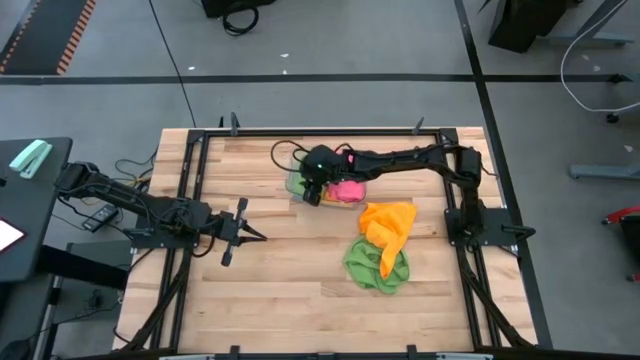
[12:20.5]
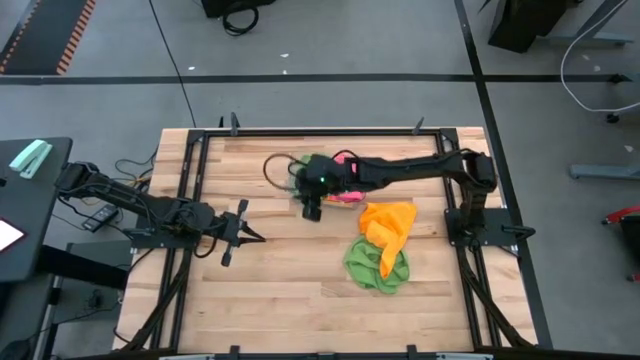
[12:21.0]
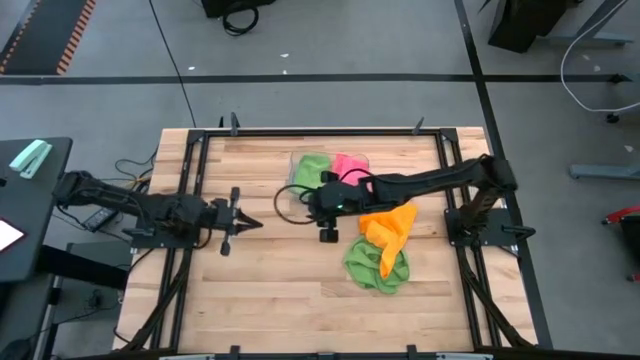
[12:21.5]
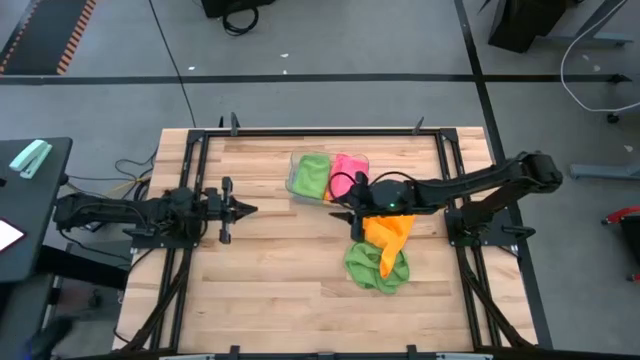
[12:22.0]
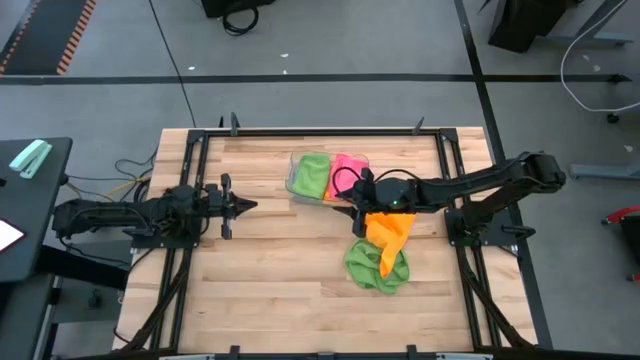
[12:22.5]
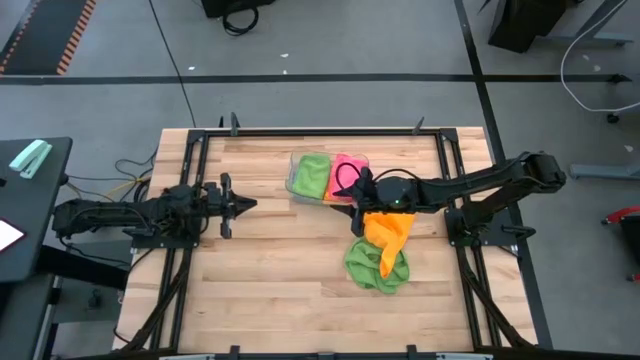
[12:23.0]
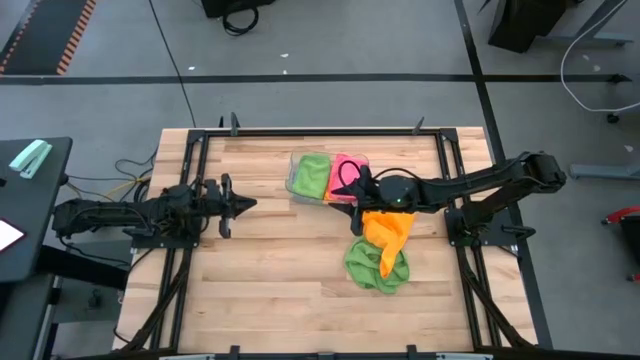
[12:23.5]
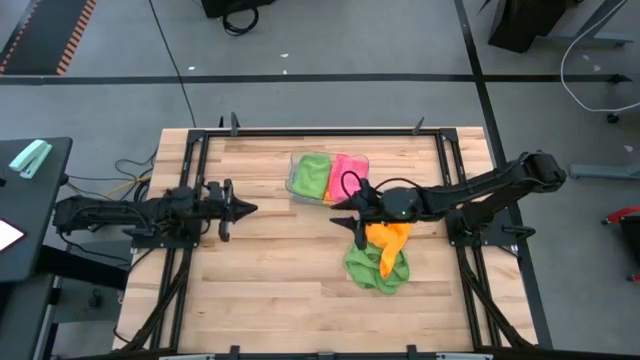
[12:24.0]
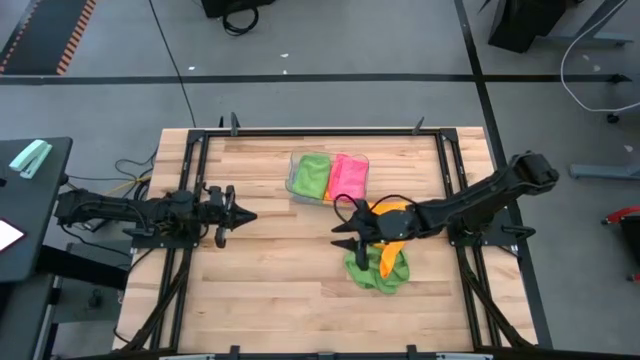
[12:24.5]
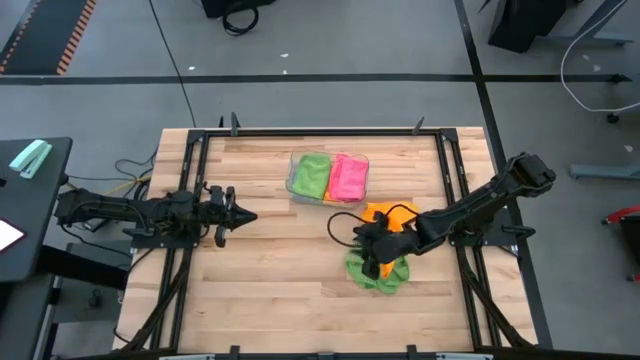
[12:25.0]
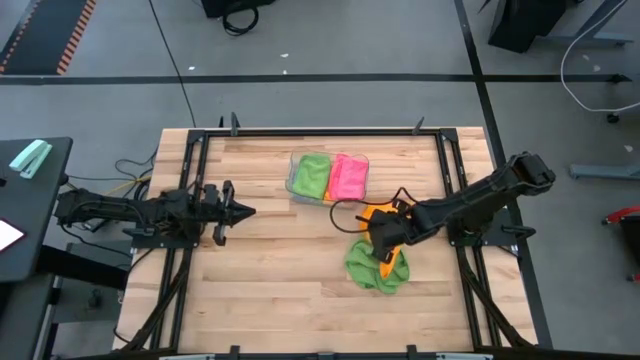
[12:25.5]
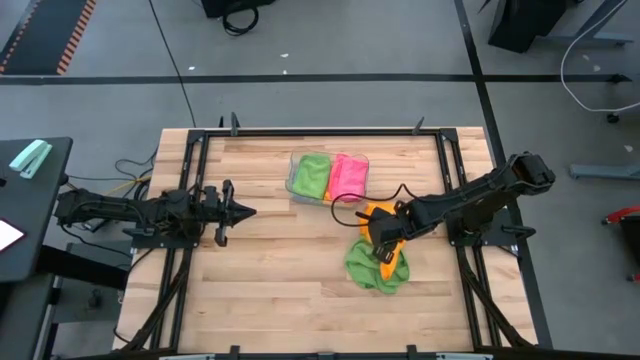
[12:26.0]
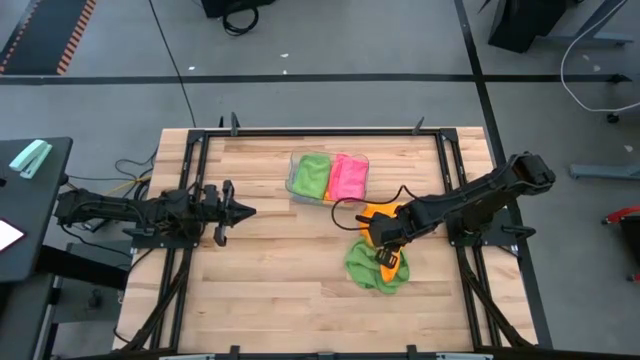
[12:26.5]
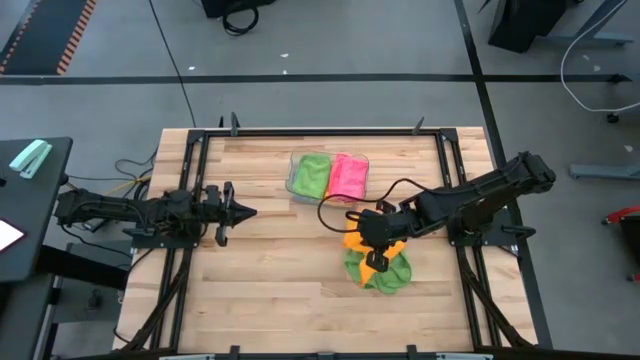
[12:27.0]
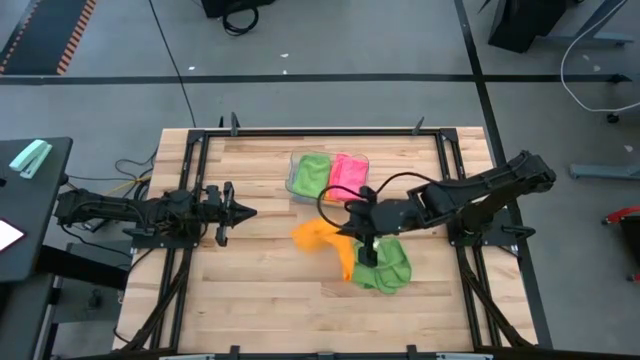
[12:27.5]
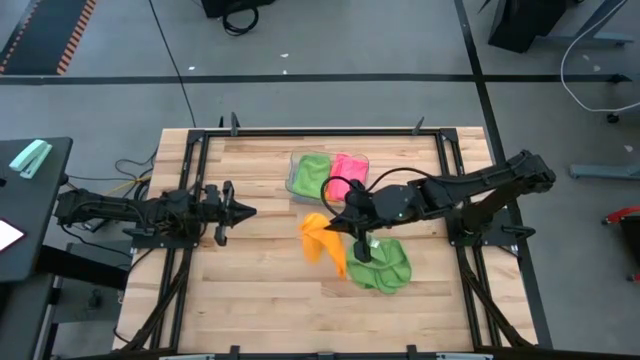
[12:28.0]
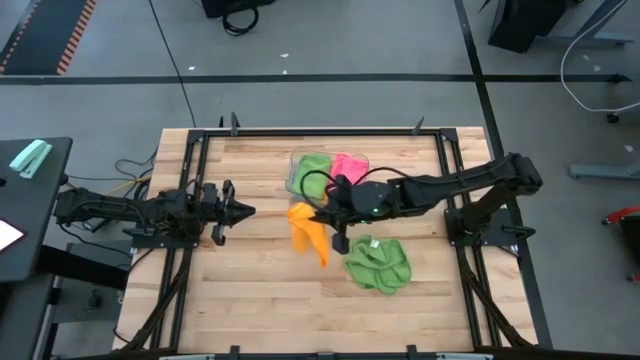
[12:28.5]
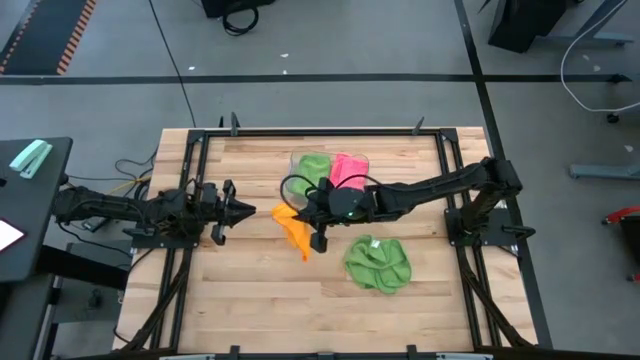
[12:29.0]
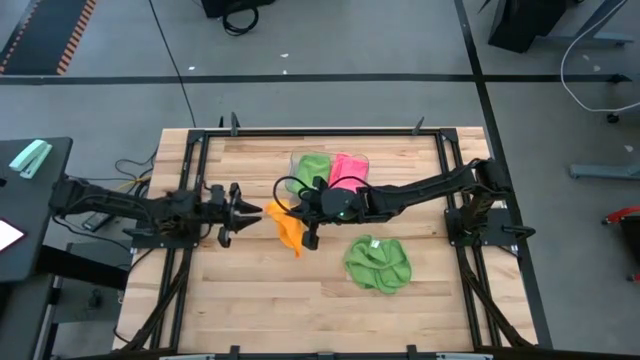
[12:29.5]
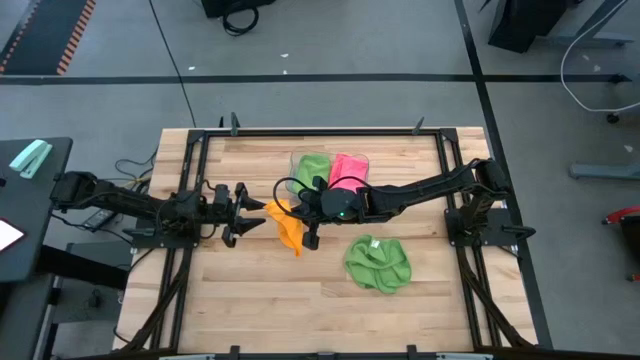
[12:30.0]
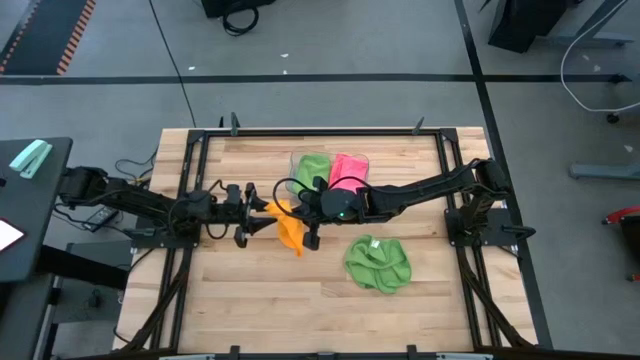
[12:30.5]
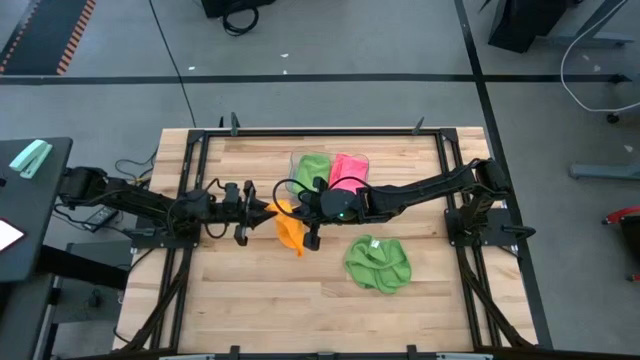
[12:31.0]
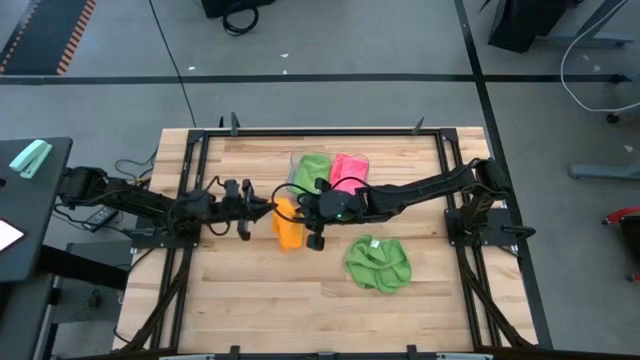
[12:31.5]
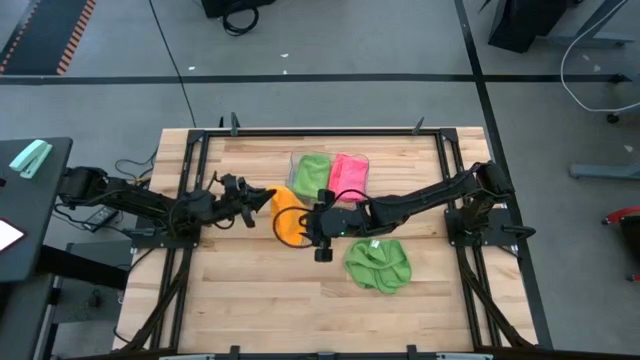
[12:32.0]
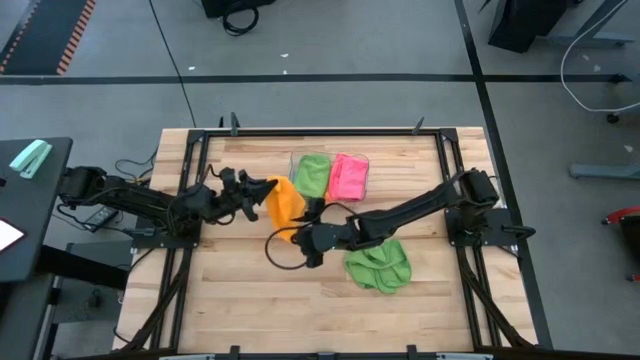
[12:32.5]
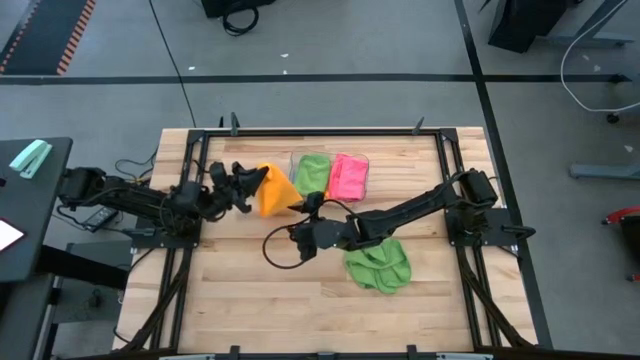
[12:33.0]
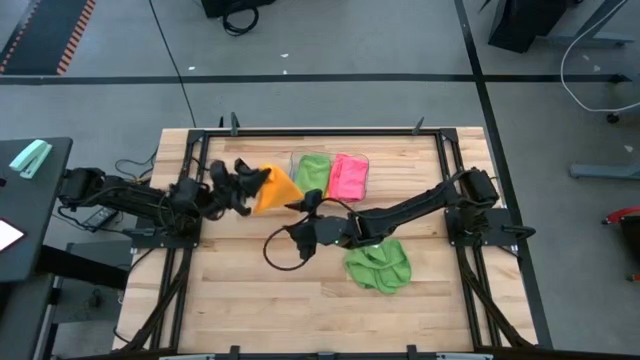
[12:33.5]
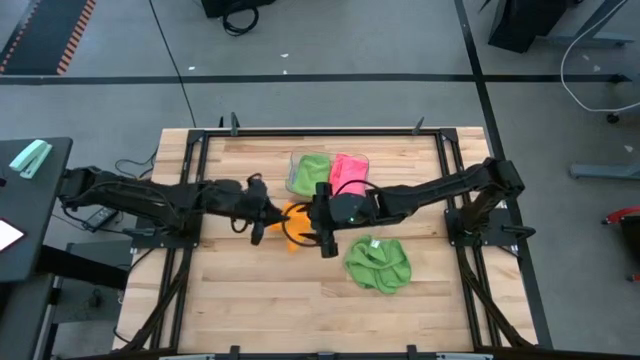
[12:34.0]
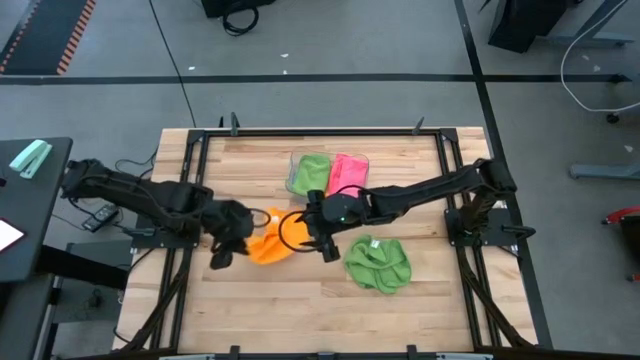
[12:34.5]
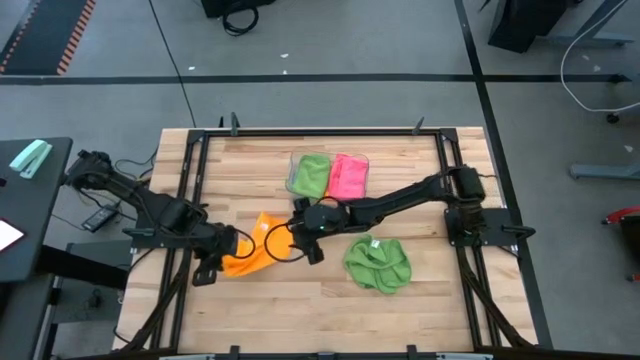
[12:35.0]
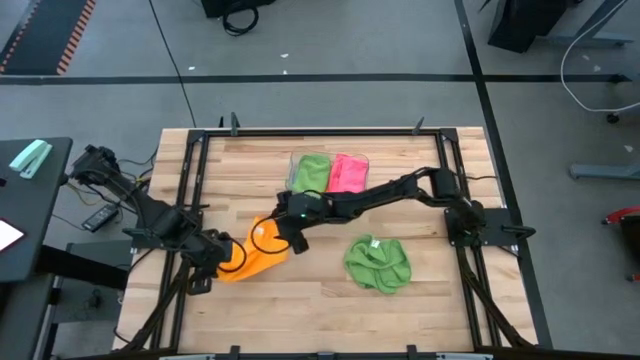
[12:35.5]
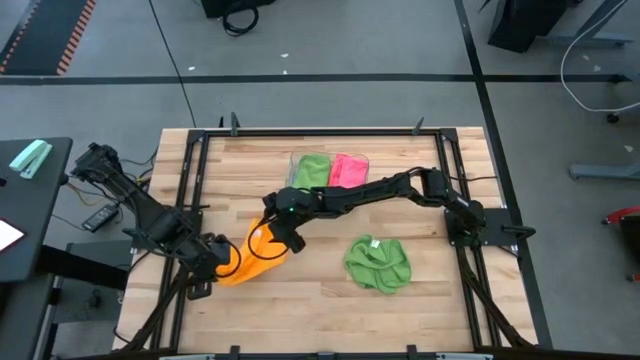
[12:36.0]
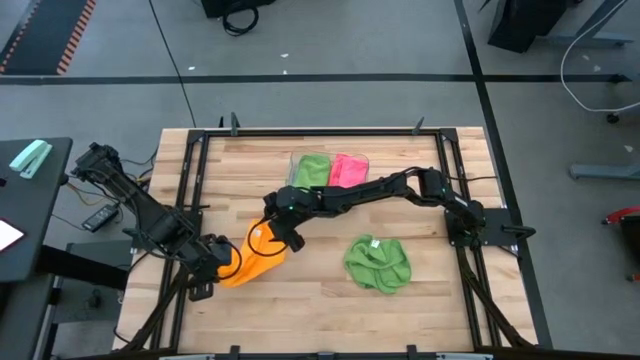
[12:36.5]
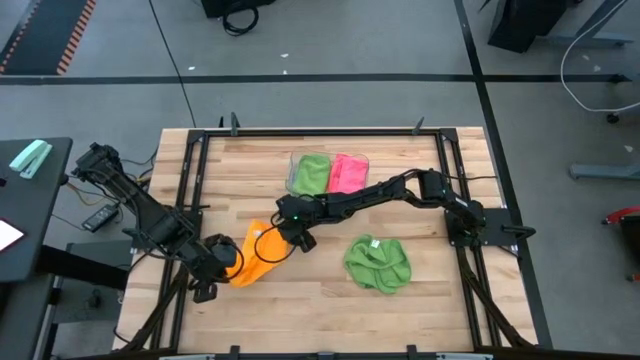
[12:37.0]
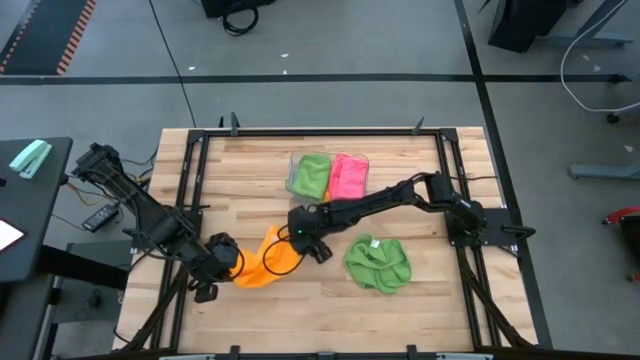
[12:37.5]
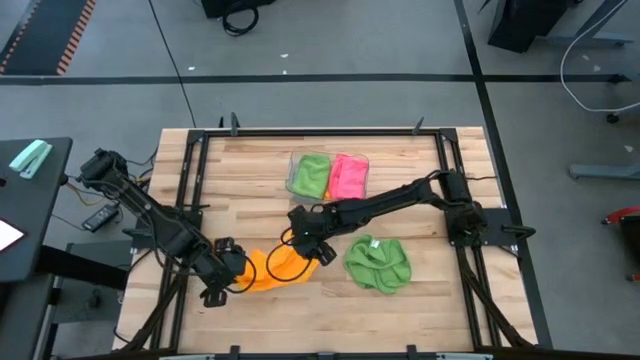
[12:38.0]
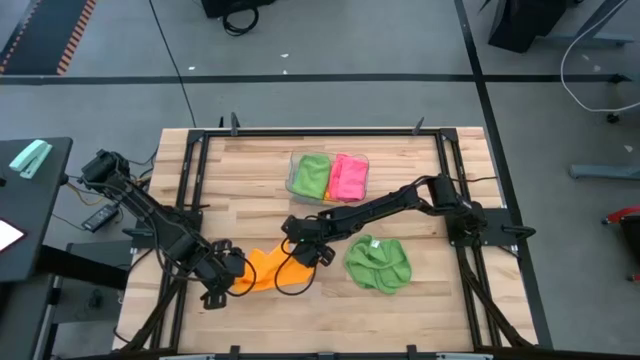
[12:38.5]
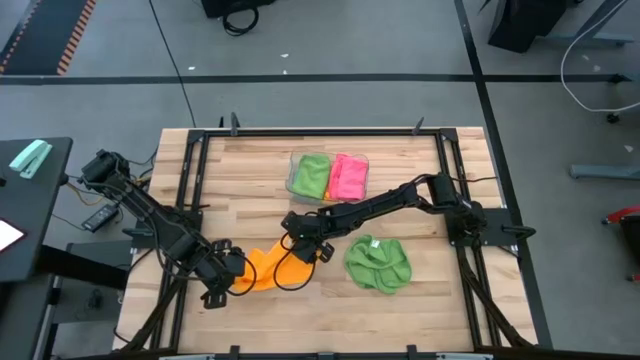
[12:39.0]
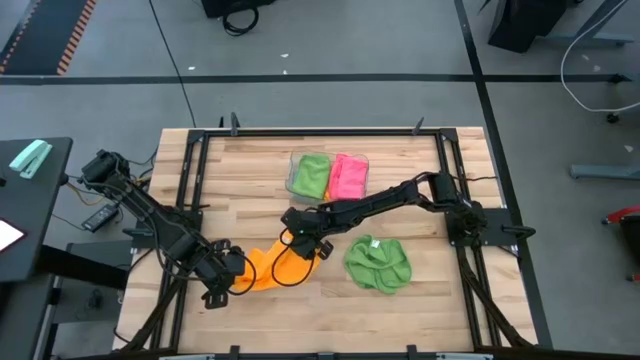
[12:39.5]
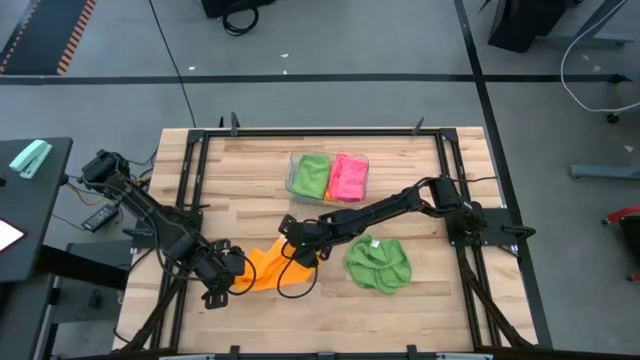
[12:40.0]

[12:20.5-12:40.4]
Task: Fold microfiber towels
Fold the yellow microfiber cloth

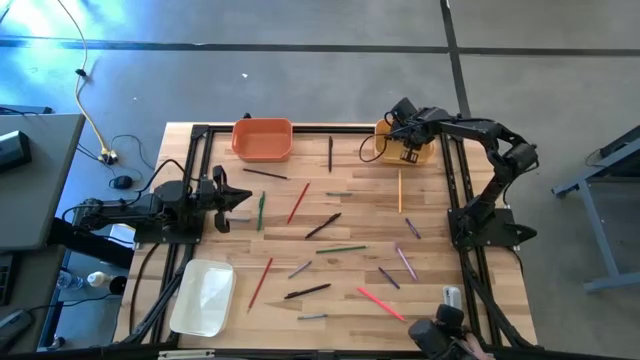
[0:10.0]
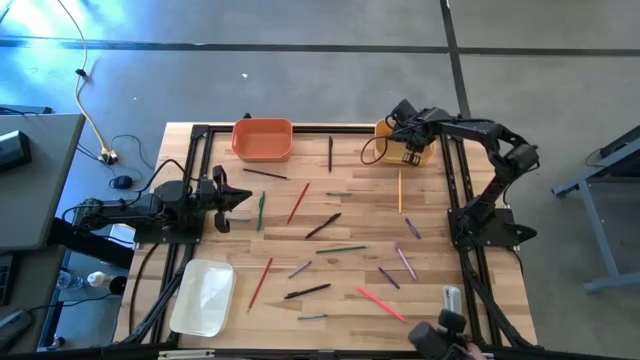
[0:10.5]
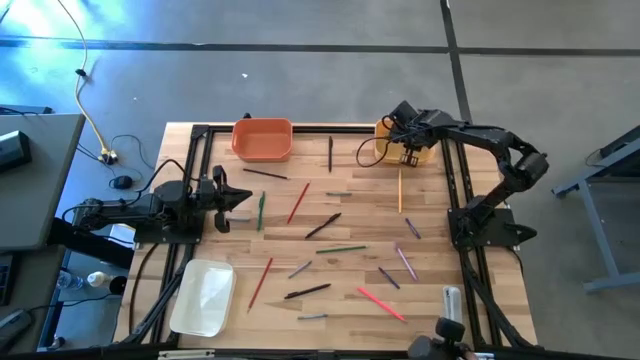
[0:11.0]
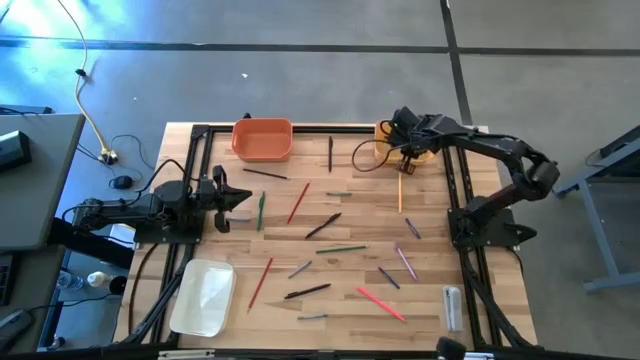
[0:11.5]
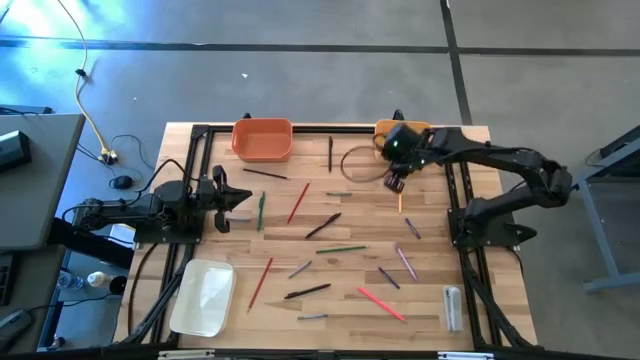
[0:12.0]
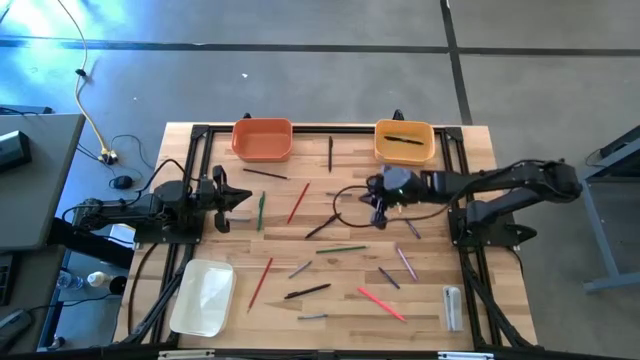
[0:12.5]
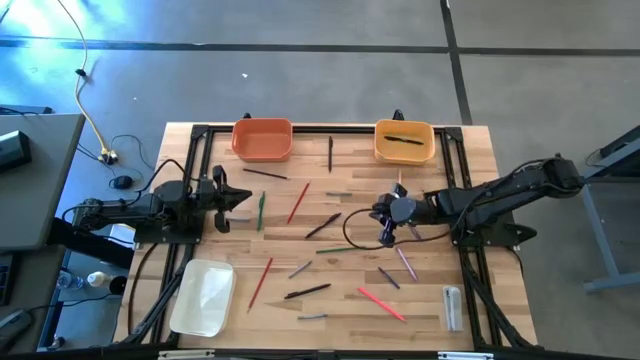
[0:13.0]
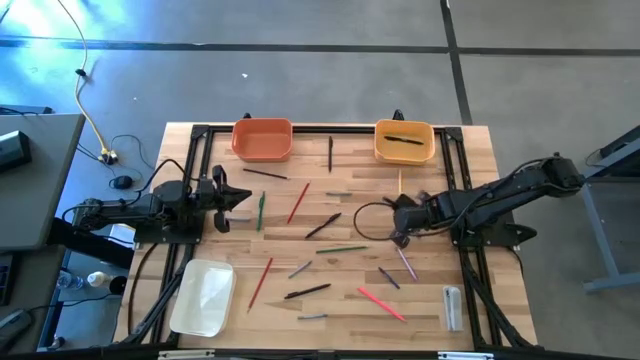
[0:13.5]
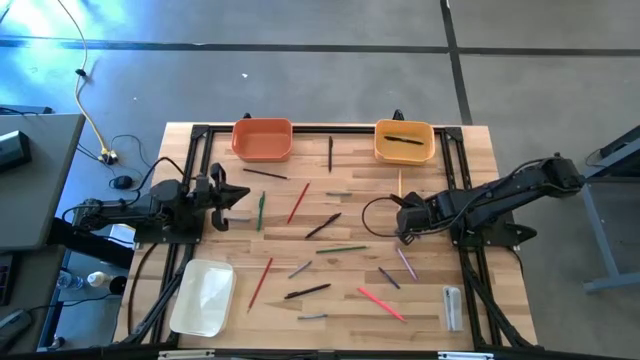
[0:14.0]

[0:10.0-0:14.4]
Task: Sort crayons/erasers/pens/pencils in bins
Put the blue crayon into the orange bin
